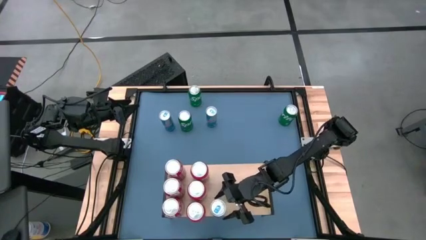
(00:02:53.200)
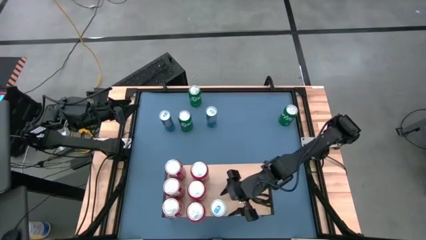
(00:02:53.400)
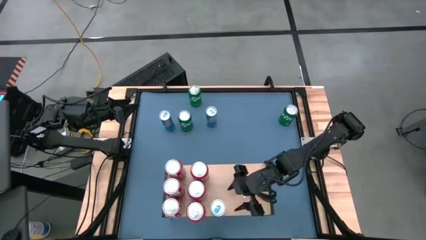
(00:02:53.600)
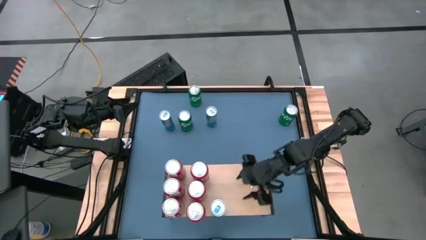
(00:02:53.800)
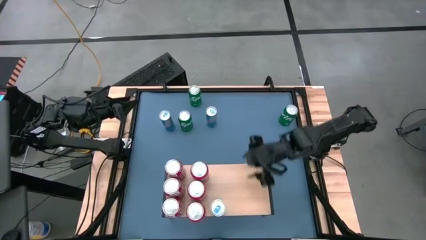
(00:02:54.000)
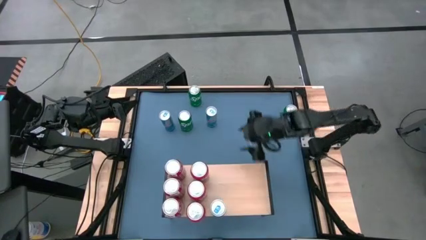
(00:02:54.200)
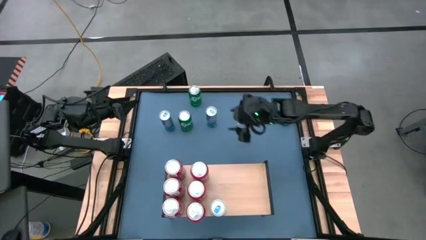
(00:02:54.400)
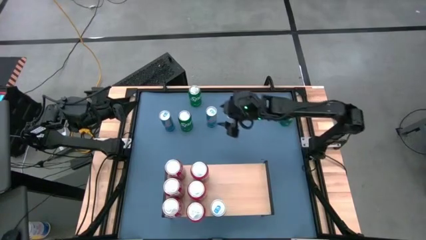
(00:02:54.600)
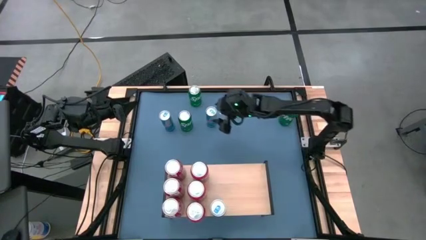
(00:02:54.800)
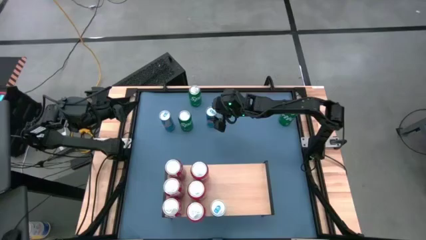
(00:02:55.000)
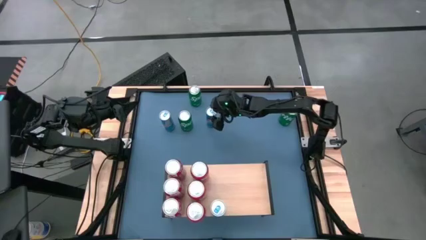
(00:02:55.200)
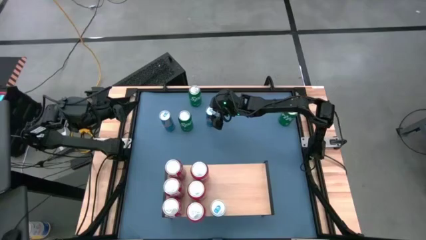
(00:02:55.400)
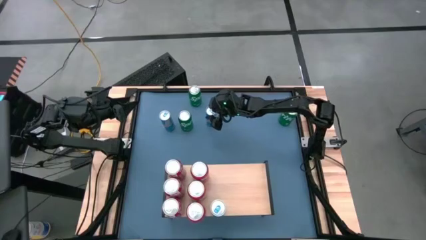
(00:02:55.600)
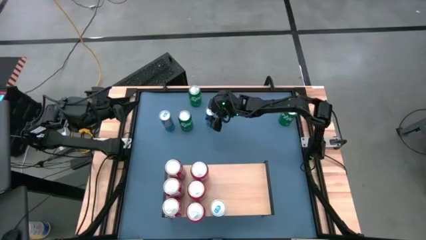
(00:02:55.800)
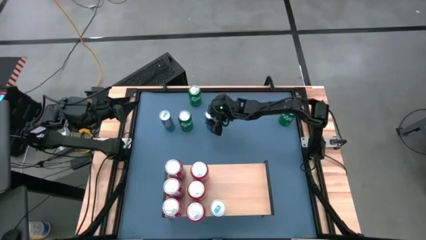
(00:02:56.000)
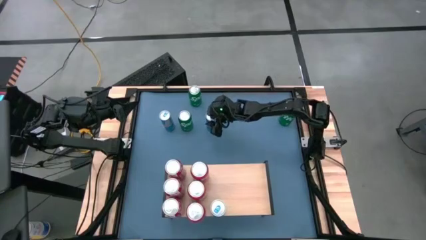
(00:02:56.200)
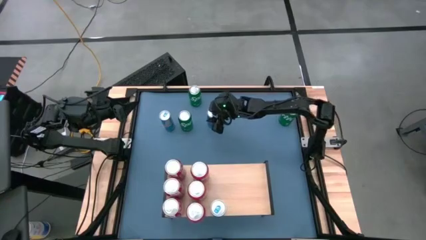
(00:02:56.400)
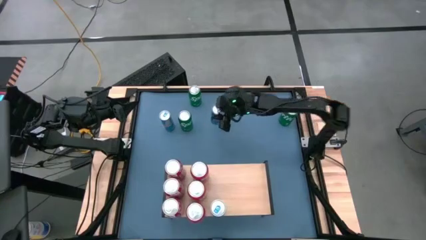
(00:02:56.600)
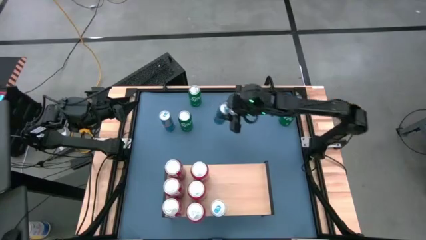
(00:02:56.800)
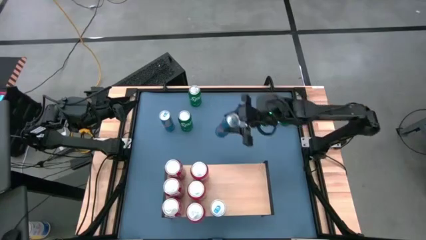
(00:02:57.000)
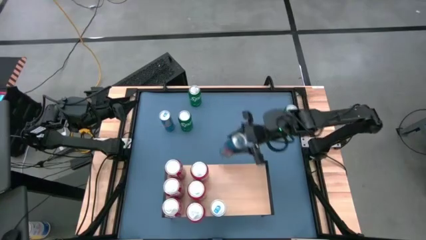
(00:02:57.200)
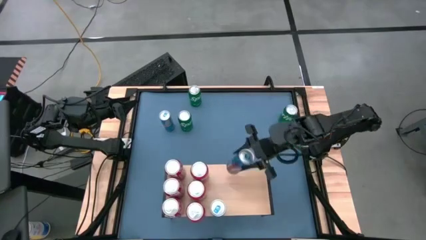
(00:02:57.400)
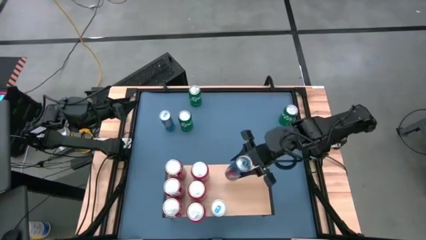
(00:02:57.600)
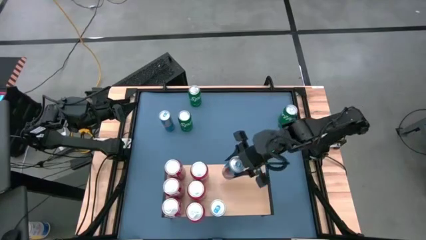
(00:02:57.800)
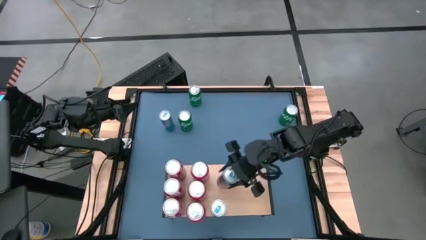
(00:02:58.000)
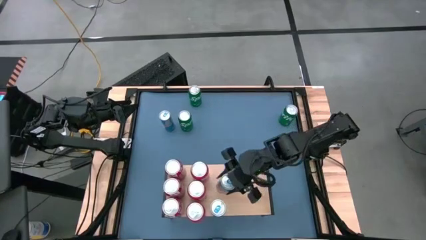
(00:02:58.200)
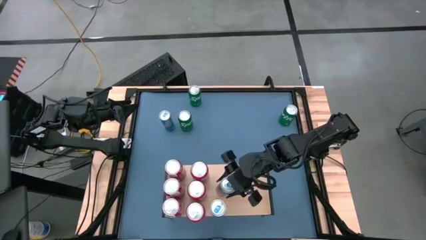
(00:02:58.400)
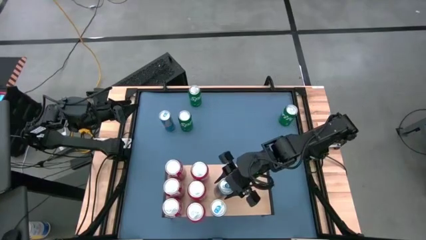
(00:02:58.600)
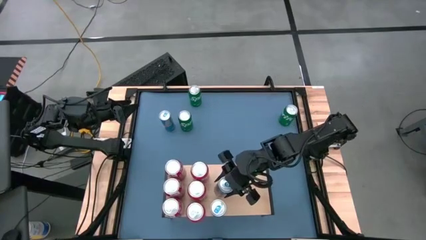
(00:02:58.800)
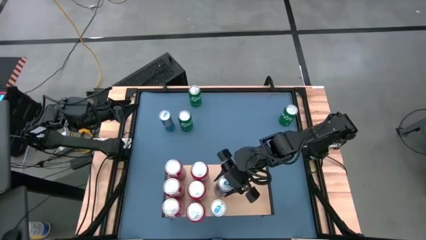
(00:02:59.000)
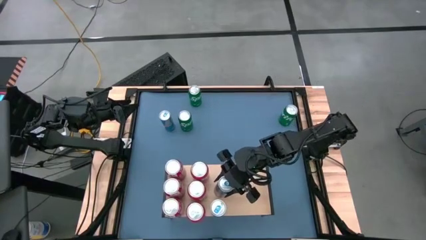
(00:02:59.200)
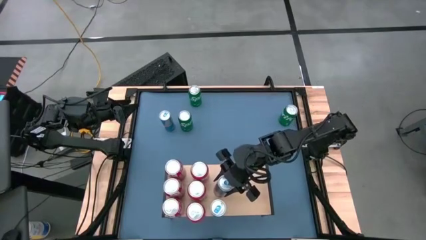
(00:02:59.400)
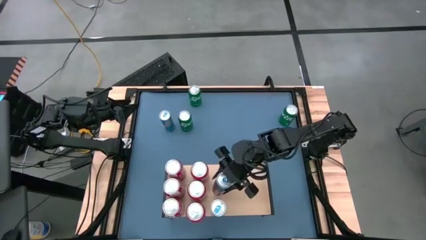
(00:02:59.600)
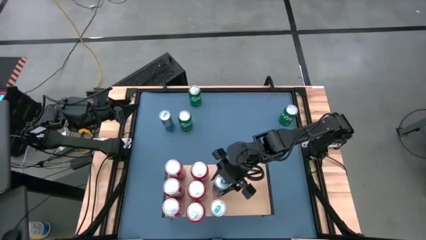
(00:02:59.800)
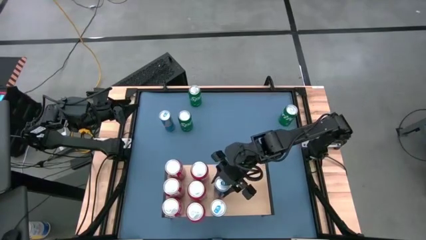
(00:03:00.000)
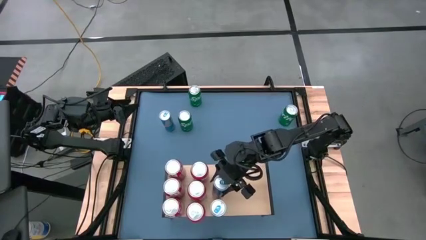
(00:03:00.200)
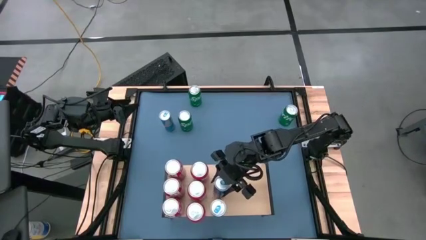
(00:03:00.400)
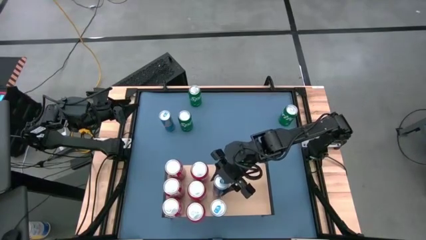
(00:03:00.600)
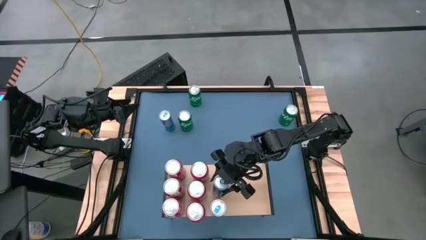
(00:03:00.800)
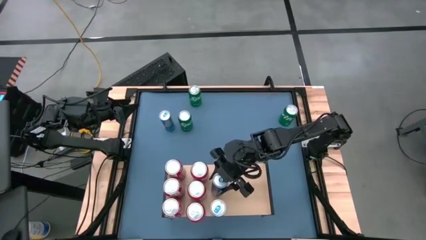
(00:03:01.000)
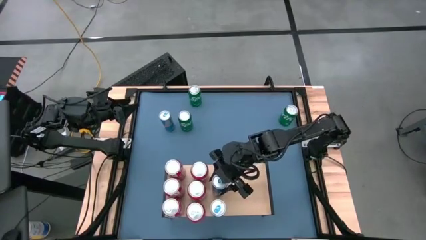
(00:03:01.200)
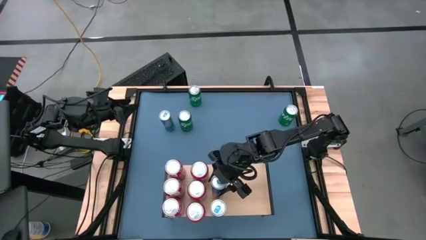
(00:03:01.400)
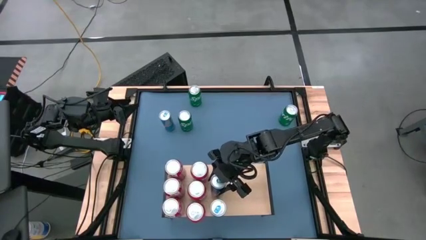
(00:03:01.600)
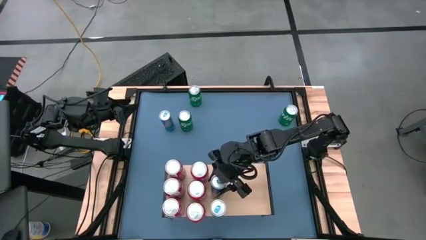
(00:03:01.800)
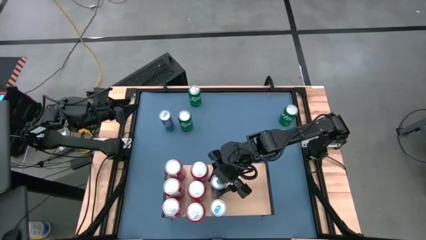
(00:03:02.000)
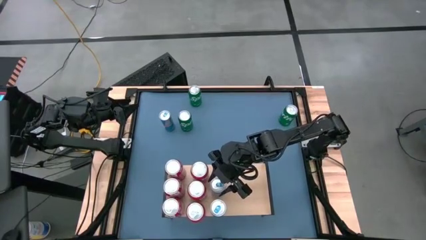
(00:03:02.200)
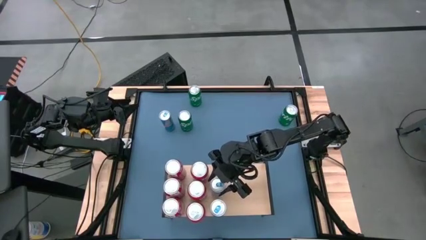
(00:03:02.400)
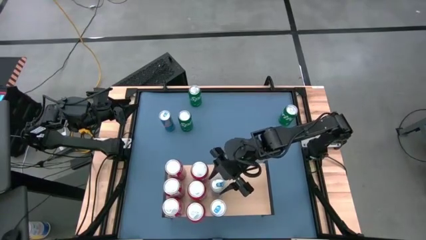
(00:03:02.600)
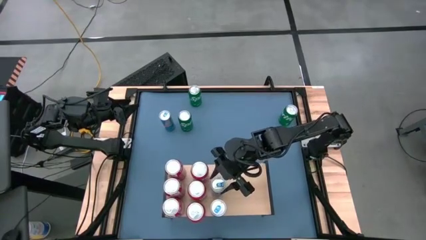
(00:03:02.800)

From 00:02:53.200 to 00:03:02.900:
Task: Place canned beverage on shelf
Put the right blue soda can on the shelf aligned with the other blue soda can

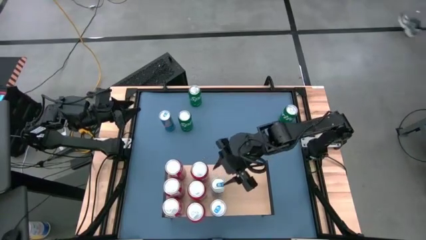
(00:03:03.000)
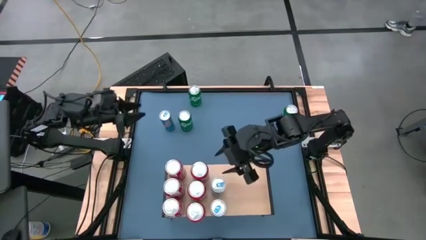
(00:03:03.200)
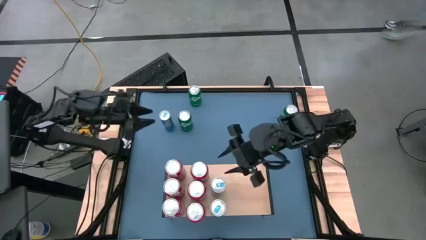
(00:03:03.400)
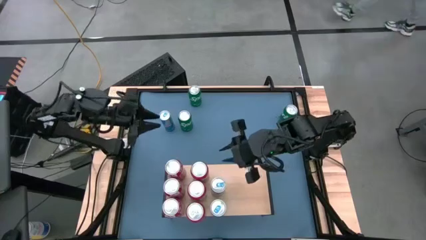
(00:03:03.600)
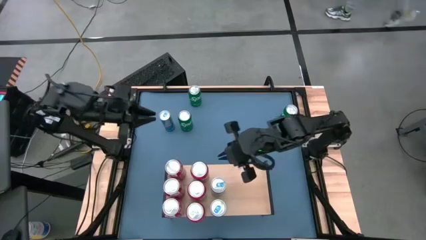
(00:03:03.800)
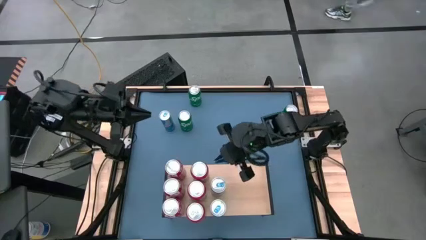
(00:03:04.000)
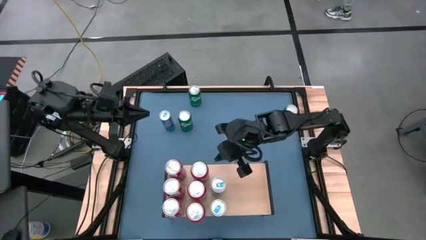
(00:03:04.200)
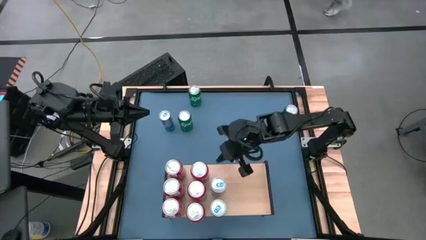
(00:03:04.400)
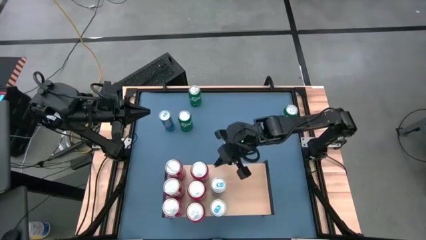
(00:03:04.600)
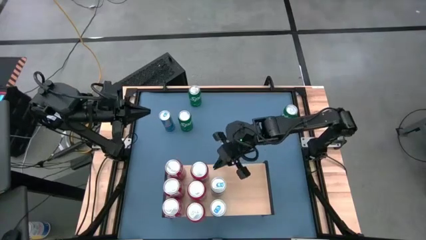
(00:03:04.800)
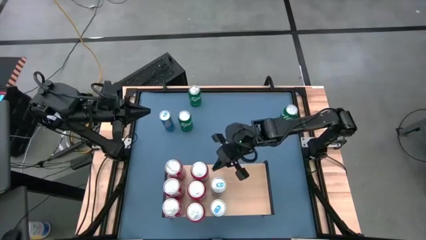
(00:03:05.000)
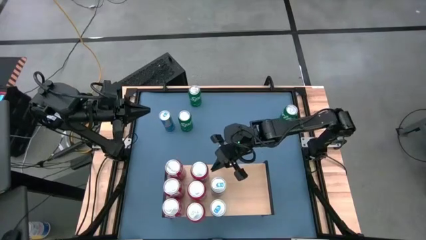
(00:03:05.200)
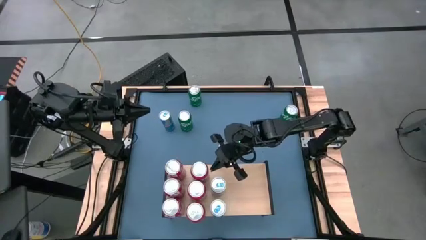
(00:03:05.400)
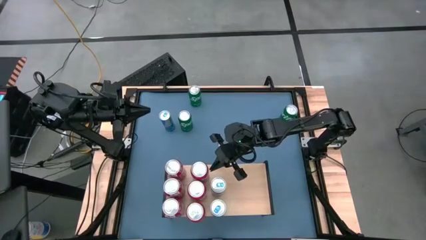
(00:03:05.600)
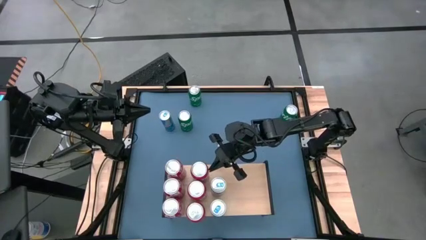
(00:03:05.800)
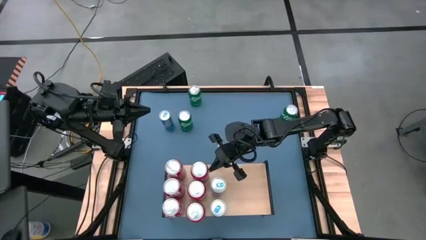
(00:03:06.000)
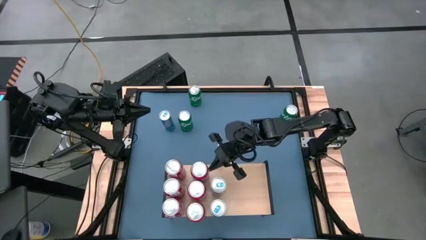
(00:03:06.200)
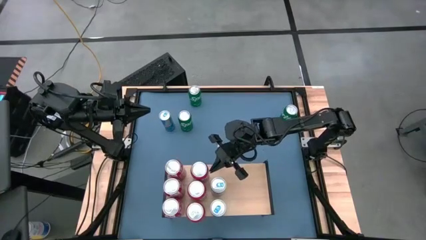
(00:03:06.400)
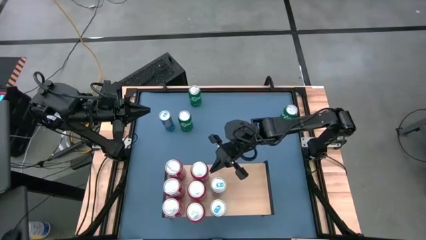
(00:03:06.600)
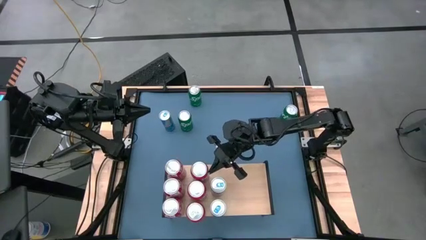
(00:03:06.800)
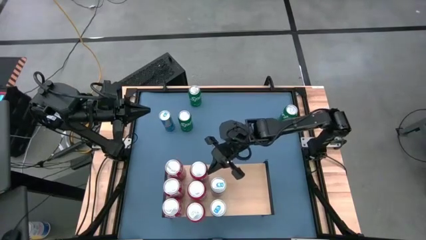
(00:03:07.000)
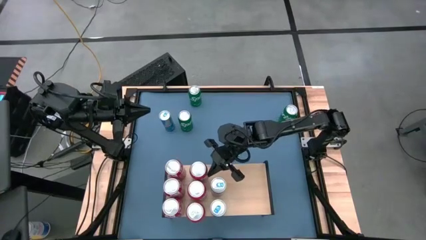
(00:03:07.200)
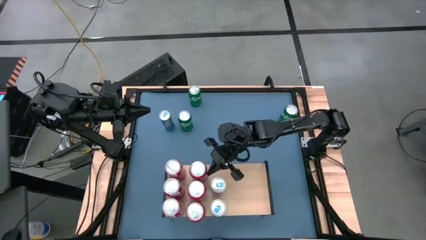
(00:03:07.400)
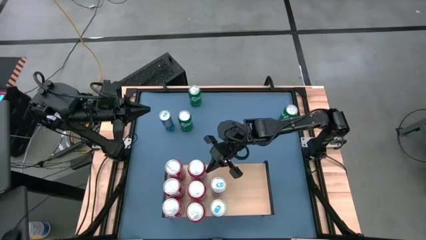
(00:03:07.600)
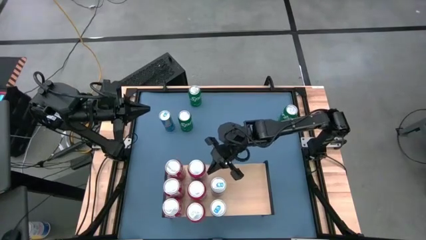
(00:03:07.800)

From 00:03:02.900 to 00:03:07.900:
Adjust the red soda can on the shelf

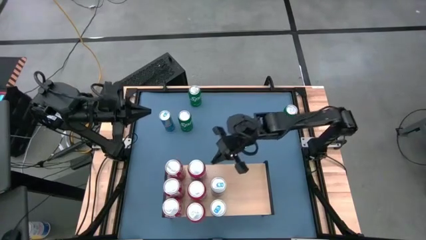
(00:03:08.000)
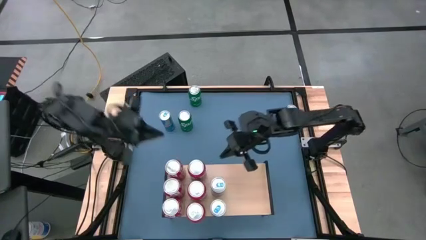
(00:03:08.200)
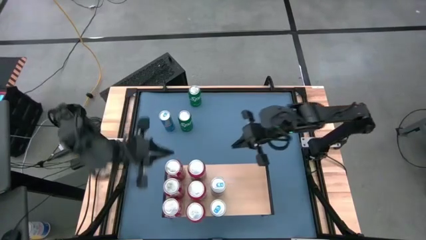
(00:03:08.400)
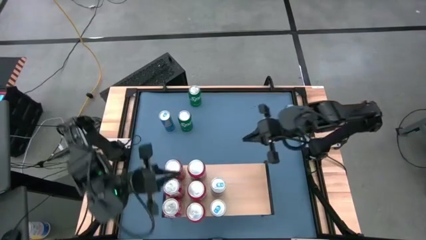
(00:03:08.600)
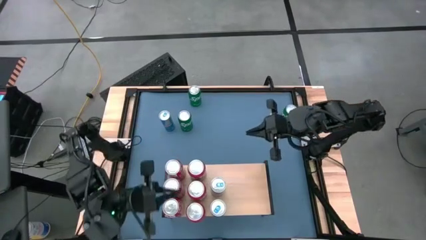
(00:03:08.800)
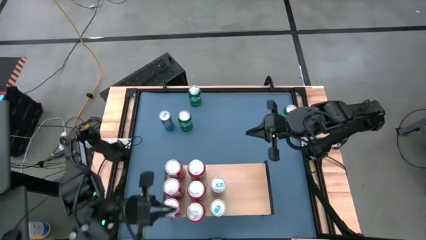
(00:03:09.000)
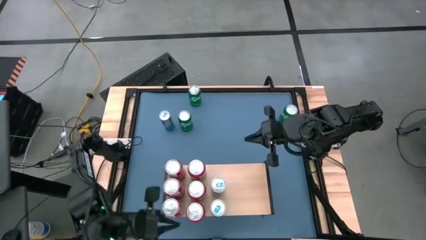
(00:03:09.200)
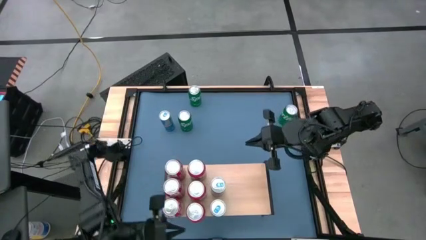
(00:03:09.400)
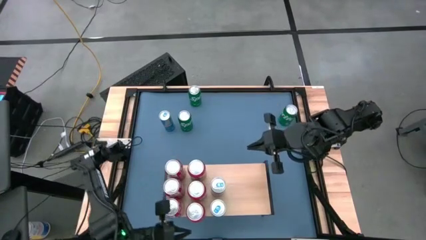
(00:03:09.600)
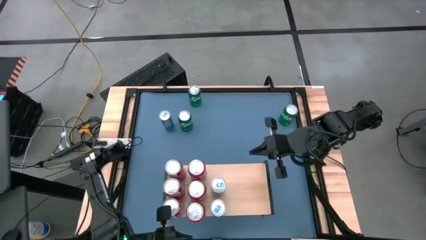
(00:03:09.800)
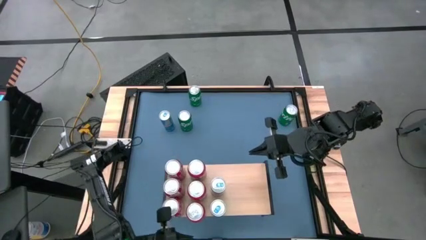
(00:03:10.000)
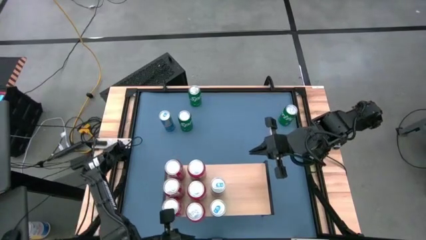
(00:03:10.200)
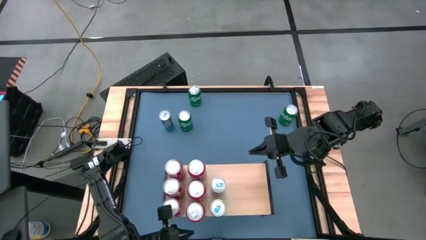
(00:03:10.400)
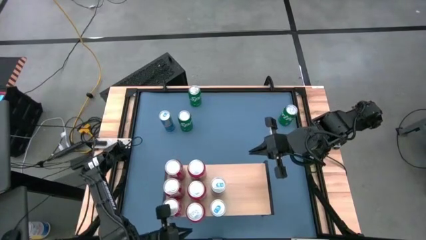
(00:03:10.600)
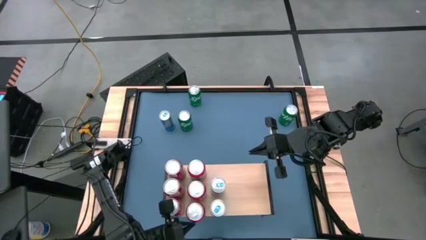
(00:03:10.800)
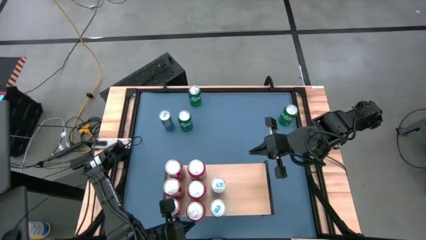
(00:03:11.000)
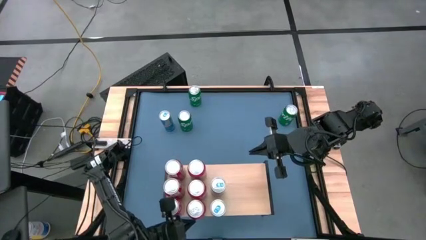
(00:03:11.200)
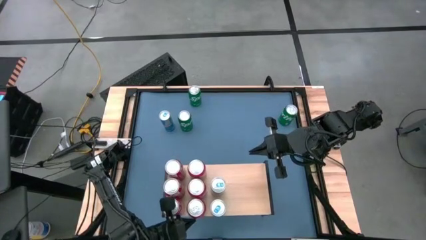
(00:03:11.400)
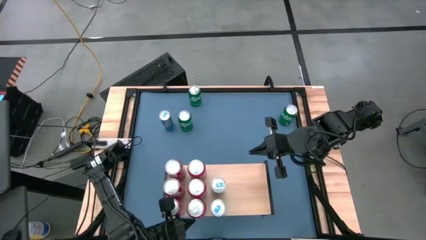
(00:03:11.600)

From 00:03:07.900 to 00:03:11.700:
Adjust the red soda can on the shelf
